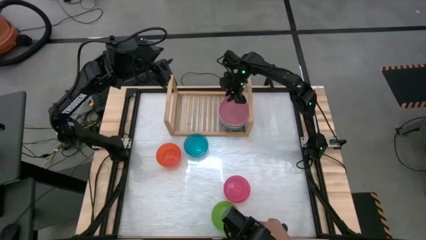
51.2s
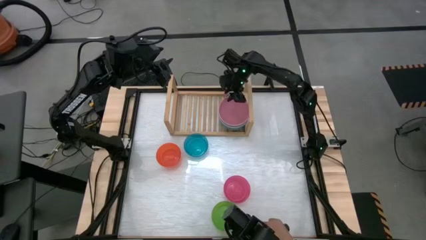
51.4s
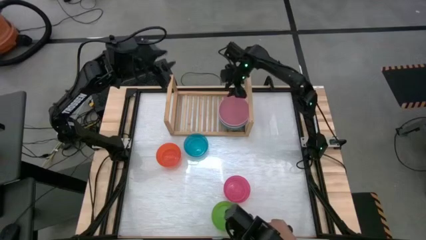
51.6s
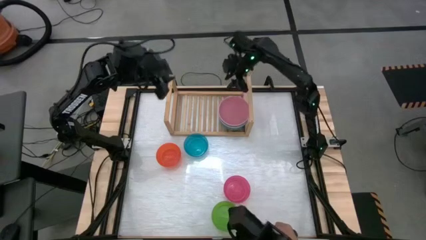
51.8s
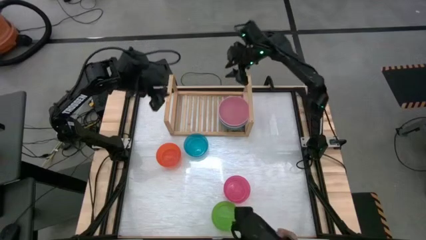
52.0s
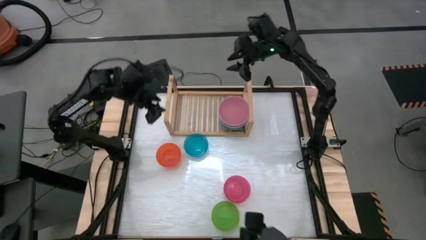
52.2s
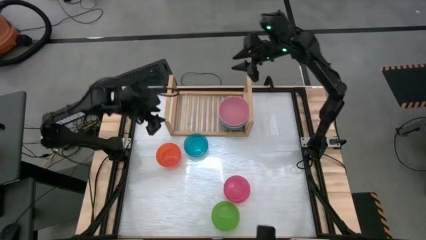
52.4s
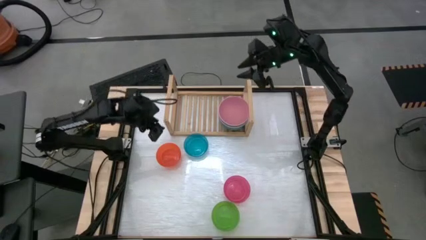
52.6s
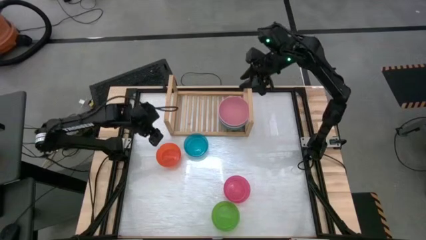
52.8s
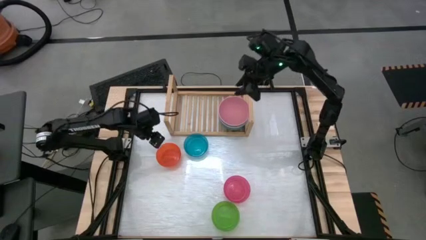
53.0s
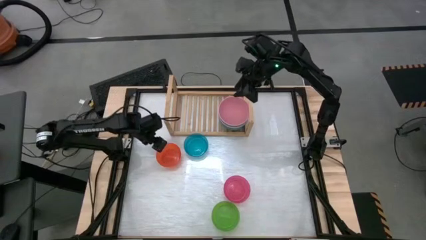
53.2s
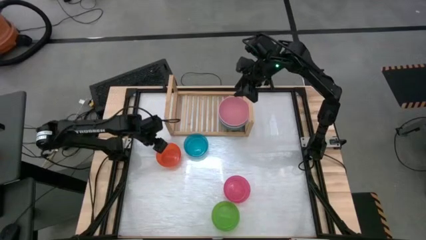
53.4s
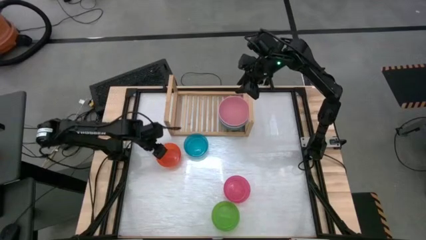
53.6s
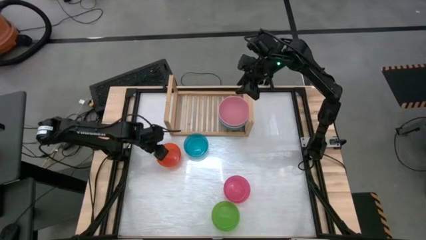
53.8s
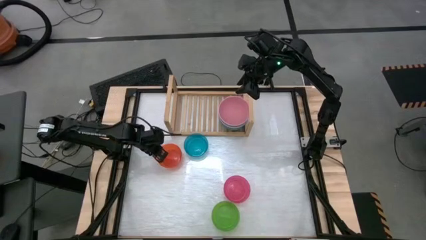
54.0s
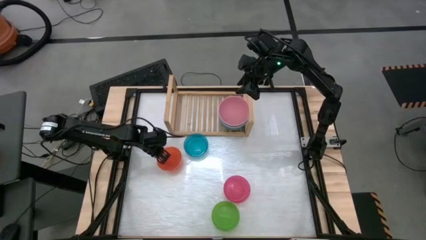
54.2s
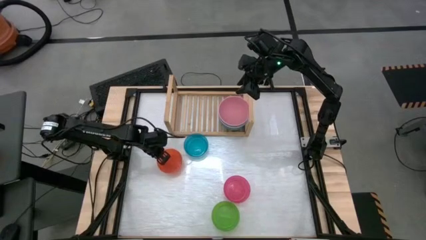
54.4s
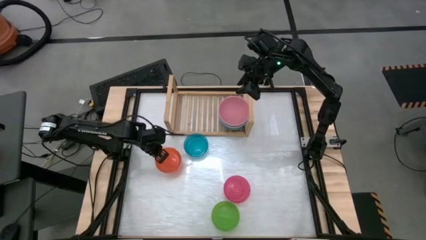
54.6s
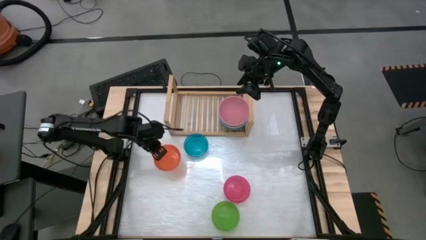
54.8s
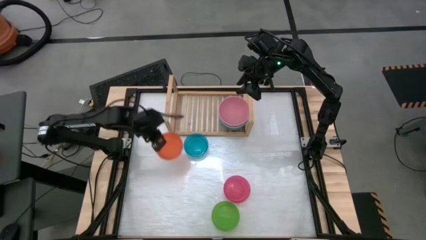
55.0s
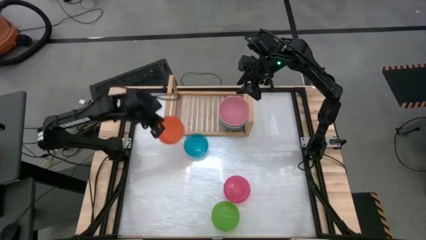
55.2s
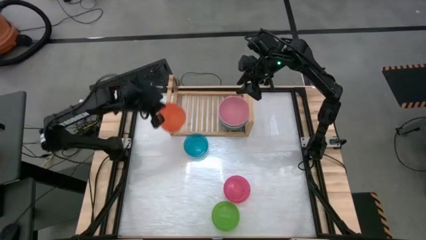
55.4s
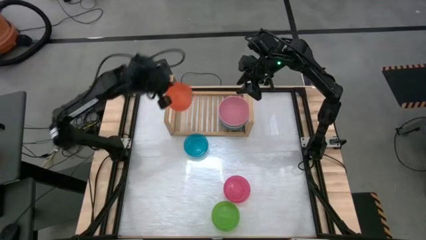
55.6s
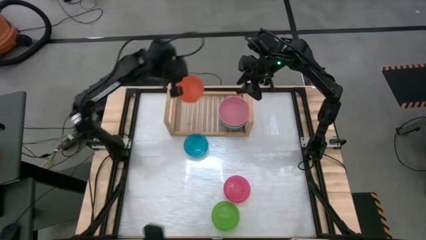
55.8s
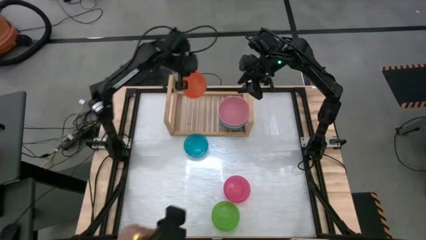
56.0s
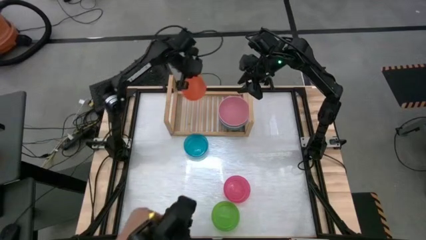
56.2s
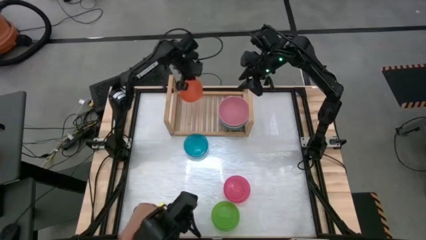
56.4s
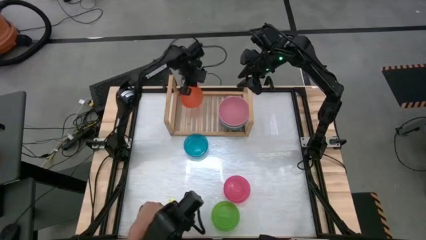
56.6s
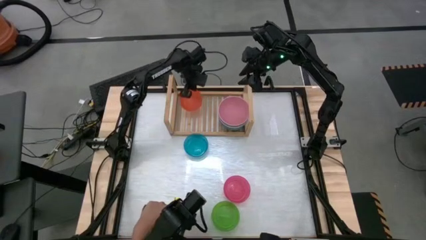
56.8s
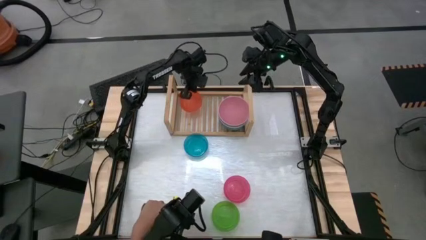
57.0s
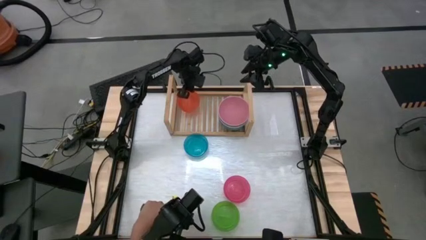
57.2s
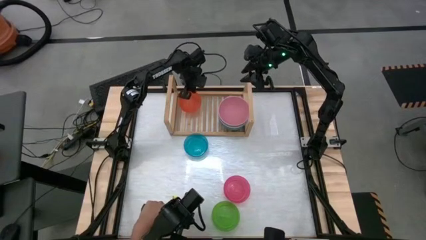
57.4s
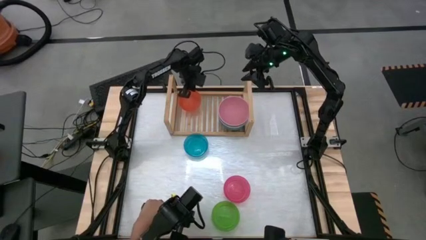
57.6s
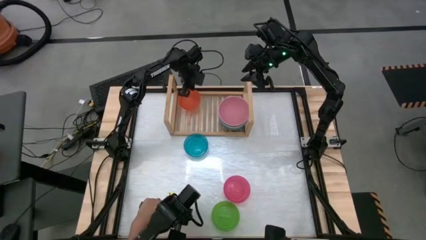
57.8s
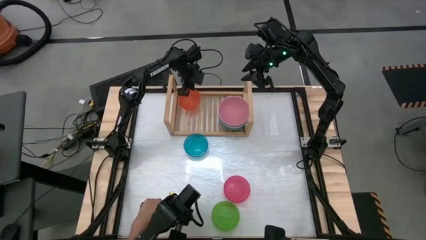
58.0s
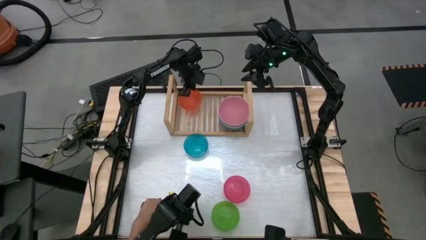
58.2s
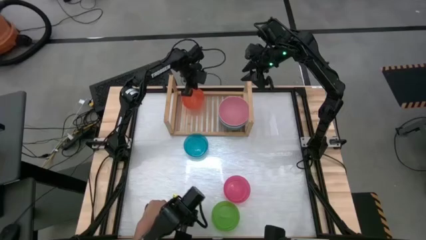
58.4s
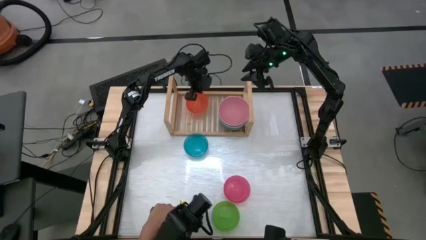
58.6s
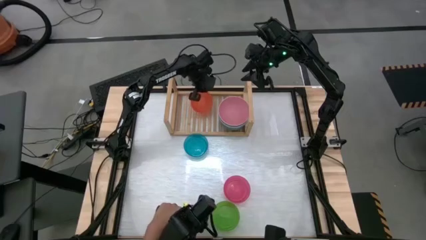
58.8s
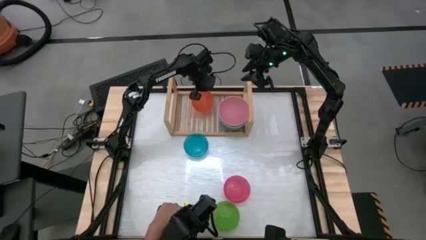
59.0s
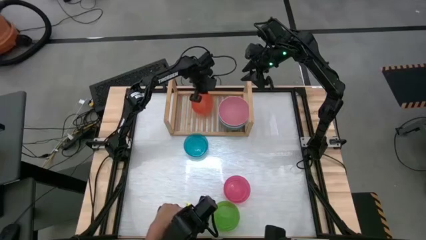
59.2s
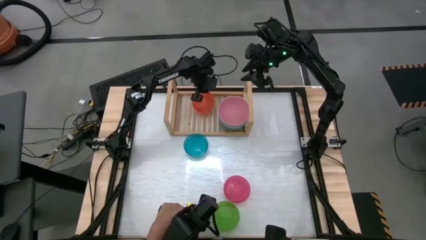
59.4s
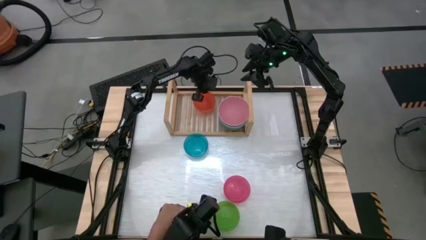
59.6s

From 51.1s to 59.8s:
Task: Place and stack bowls onto a shelf
Put the light orange bowl on the shelf

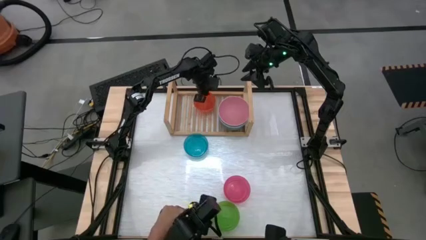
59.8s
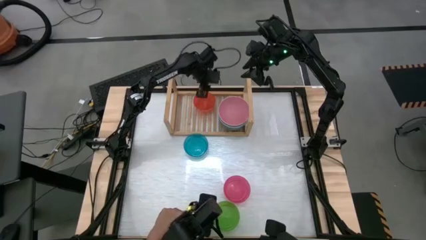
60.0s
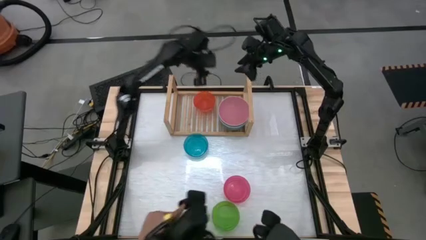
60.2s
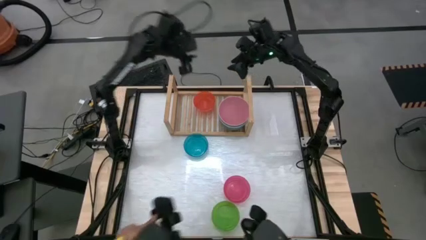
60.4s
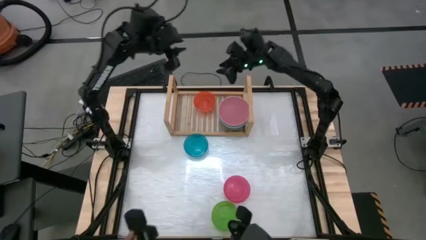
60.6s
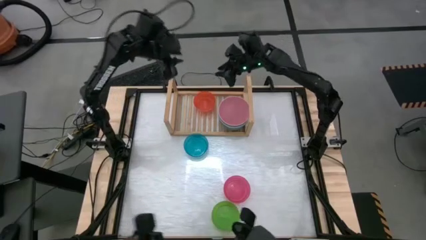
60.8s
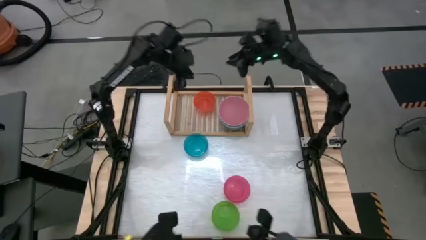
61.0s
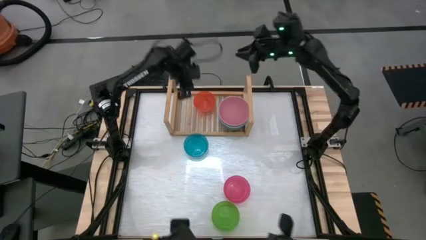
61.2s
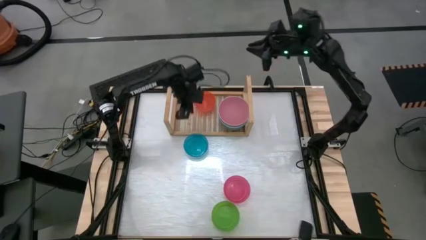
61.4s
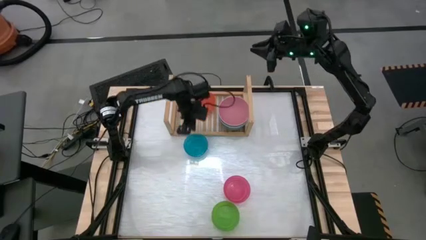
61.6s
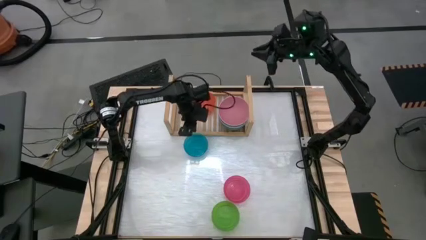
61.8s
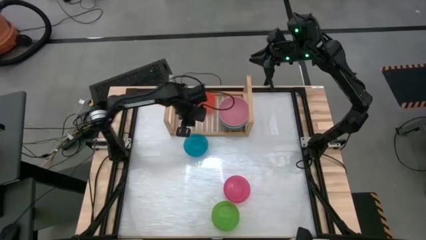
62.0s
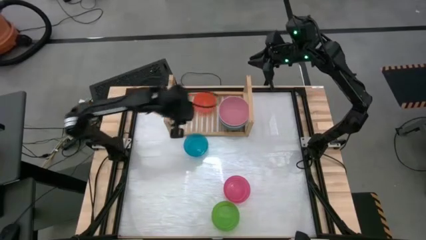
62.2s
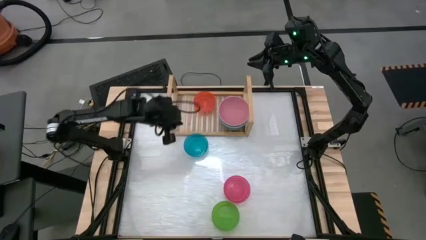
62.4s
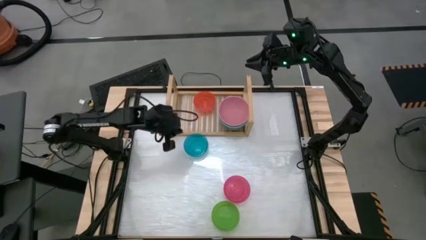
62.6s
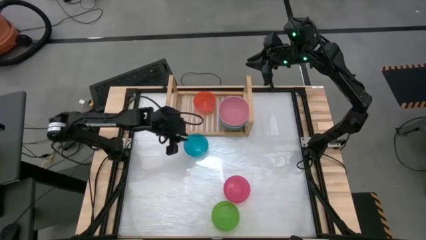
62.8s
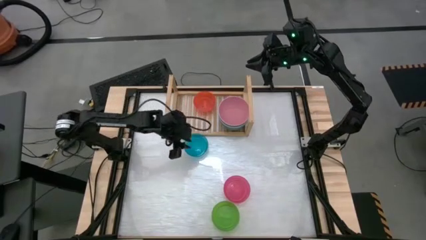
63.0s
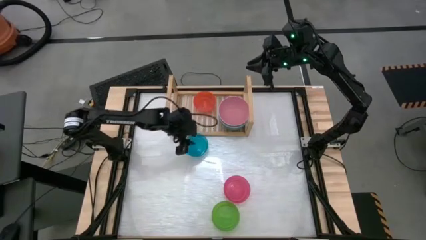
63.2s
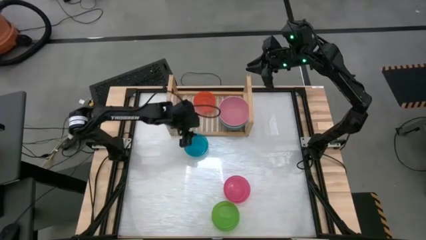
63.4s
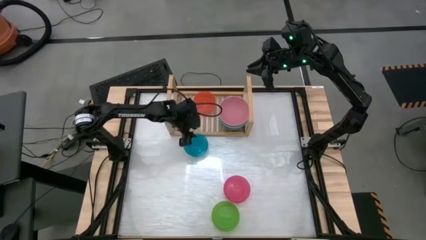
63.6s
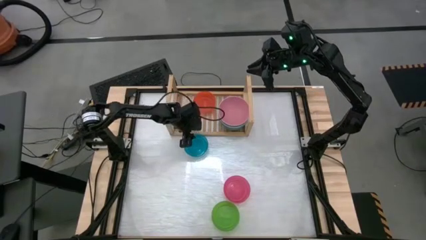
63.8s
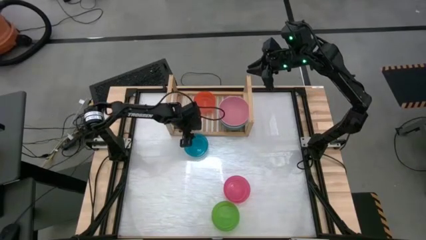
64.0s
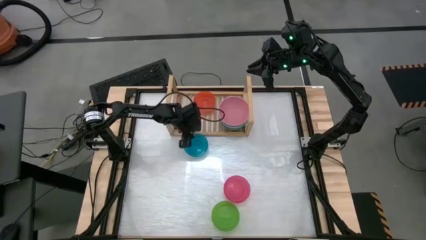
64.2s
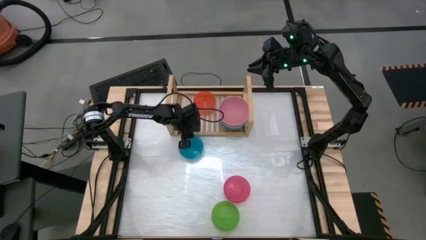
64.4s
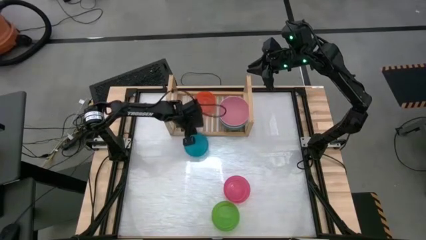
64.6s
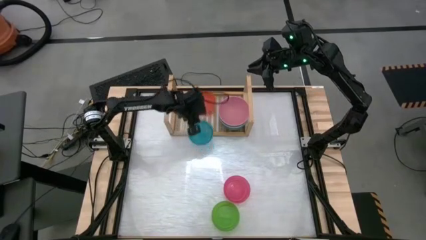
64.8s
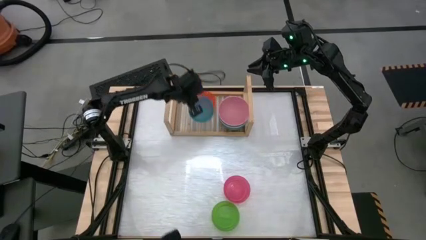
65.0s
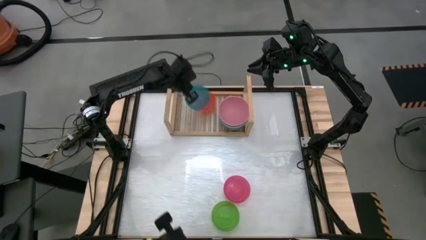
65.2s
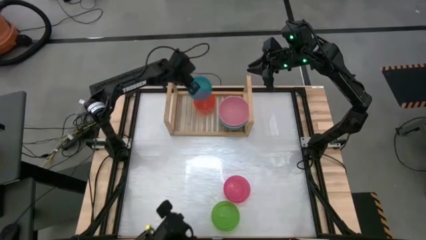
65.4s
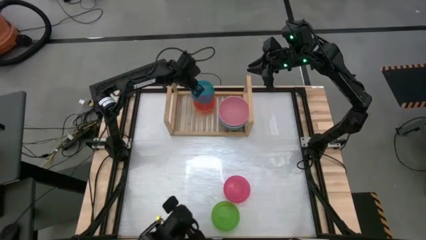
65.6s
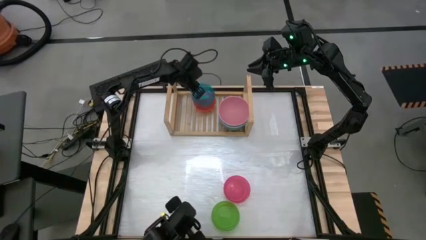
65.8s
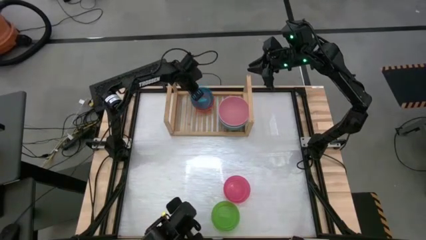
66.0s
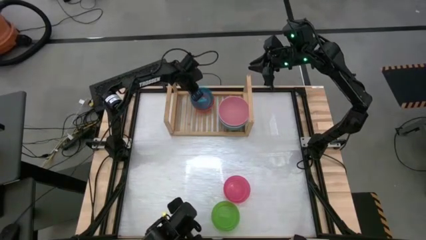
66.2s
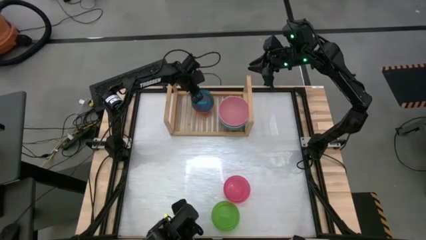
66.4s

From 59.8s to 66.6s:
Stack the light blue bowl on top of the light orange bowl on the shelf

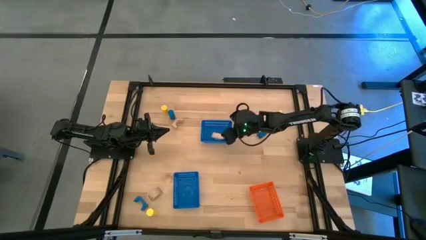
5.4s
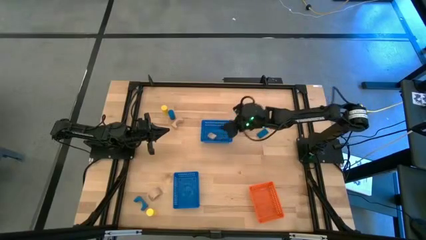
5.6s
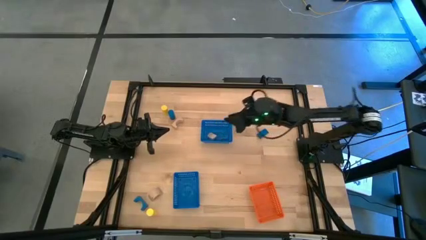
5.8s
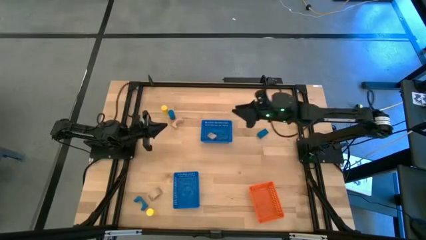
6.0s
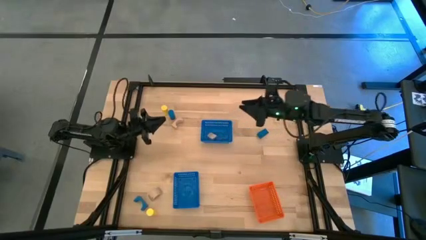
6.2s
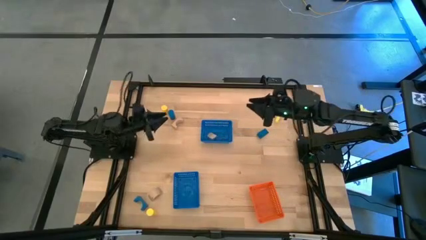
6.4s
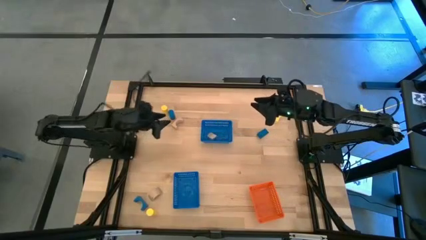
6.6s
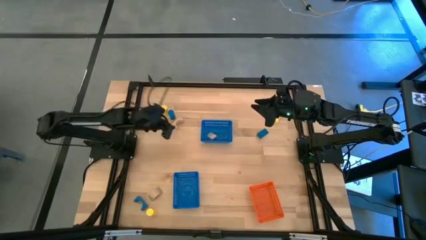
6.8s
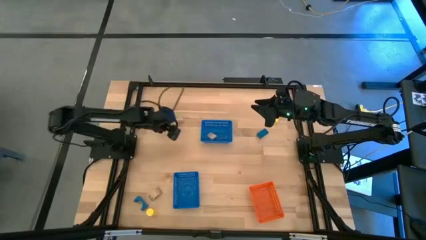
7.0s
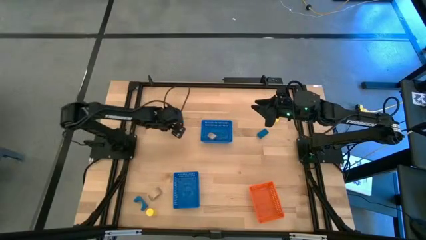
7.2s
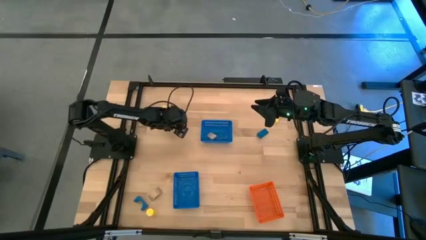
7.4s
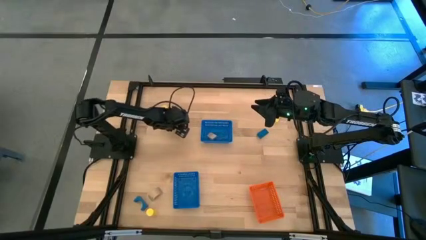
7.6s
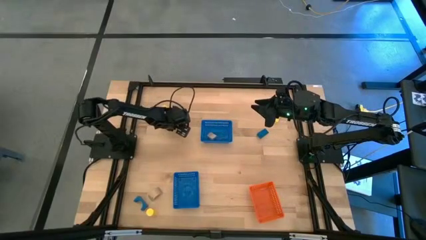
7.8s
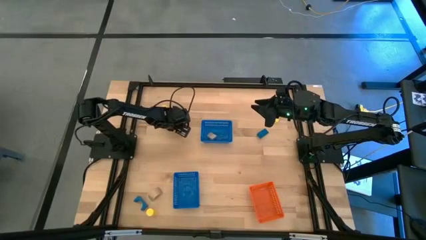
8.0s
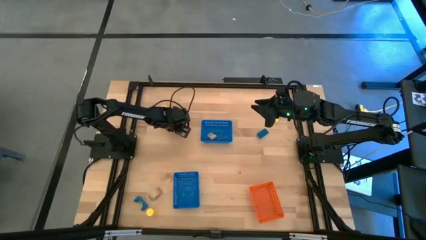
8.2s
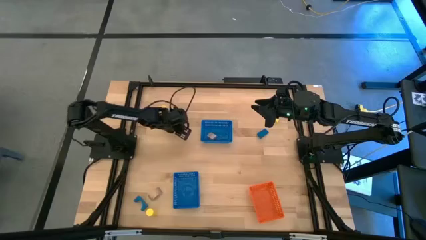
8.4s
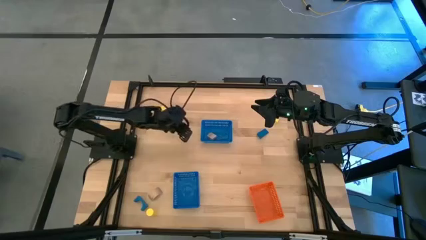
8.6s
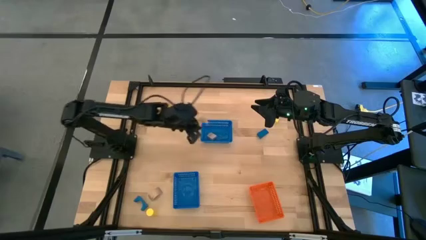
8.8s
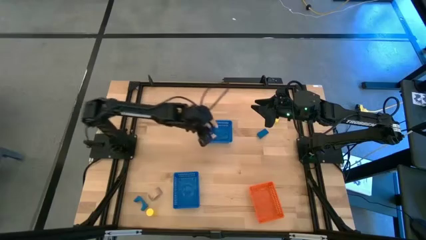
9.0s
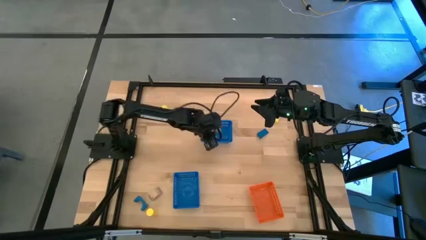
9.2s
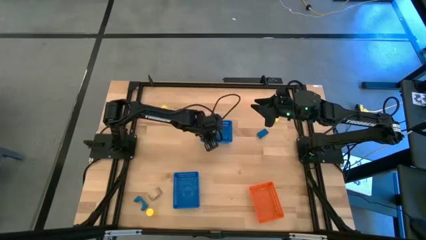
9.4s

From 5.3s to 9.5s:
Task: Sort & place blocks by color
Put the top brown block into the top blue basket
